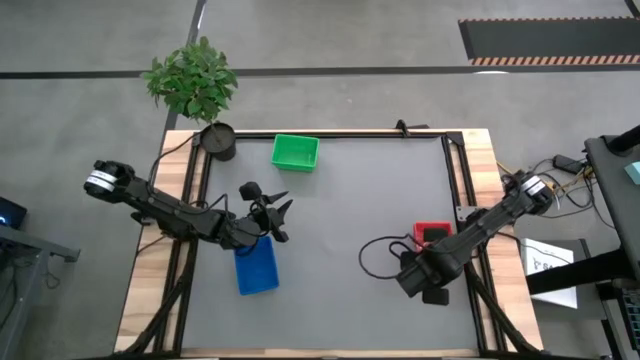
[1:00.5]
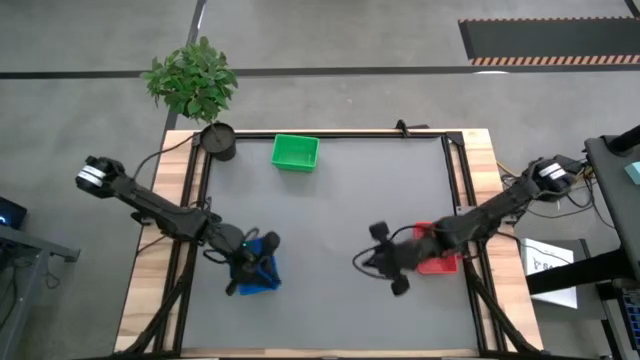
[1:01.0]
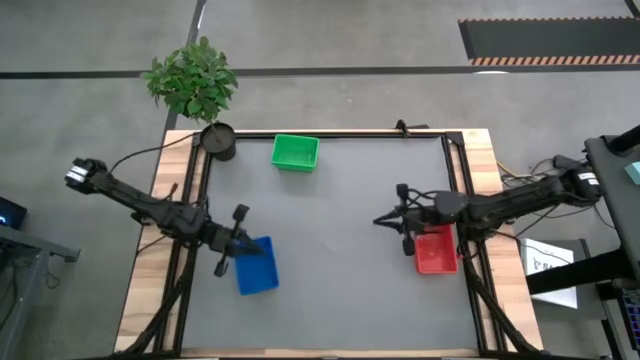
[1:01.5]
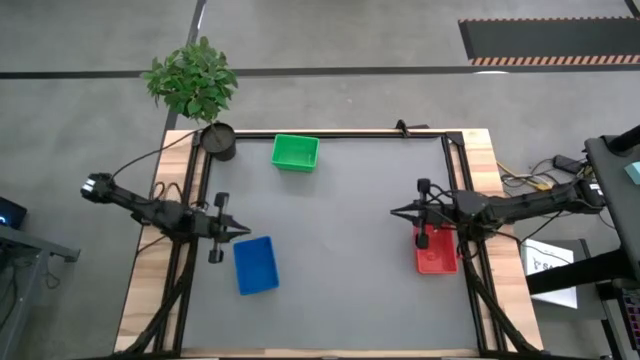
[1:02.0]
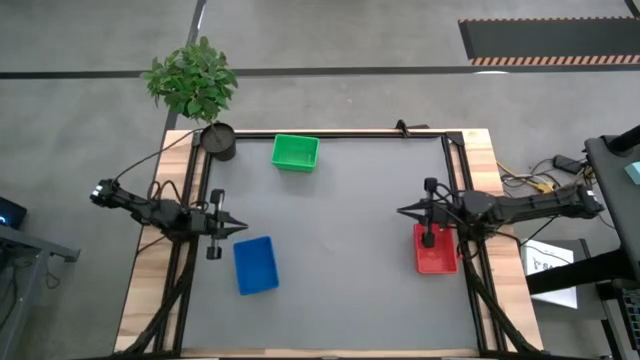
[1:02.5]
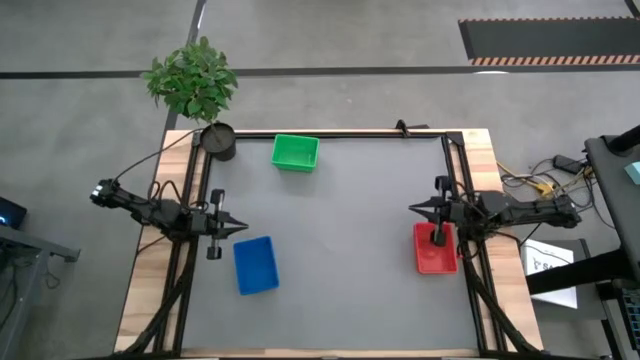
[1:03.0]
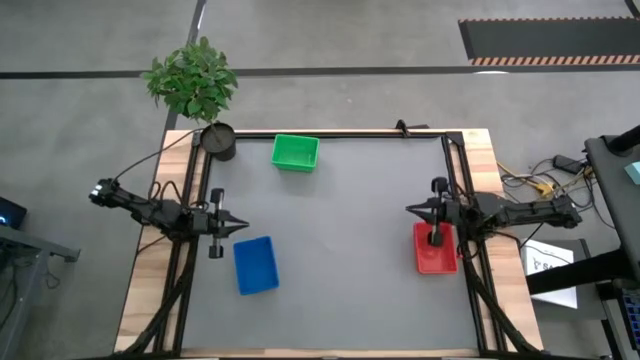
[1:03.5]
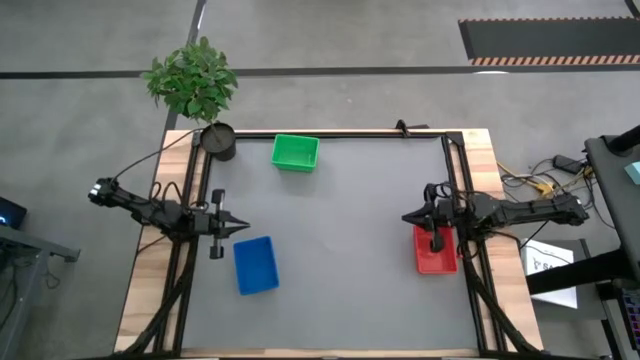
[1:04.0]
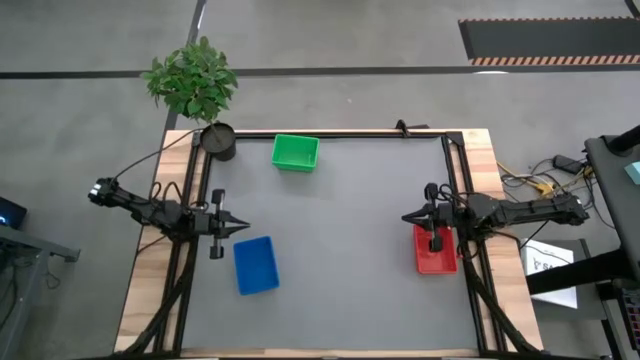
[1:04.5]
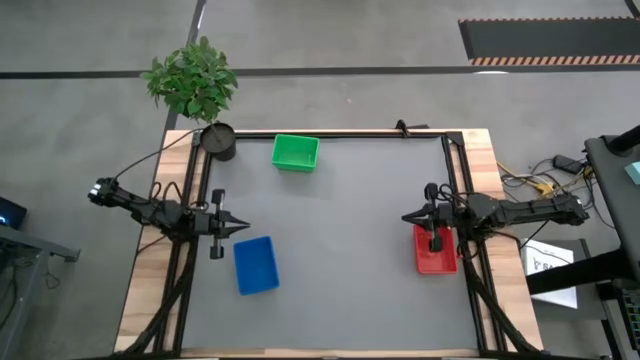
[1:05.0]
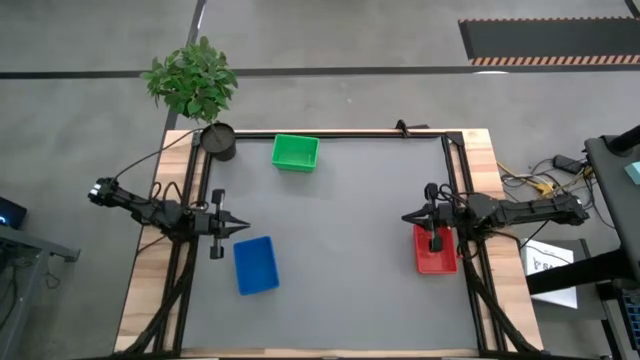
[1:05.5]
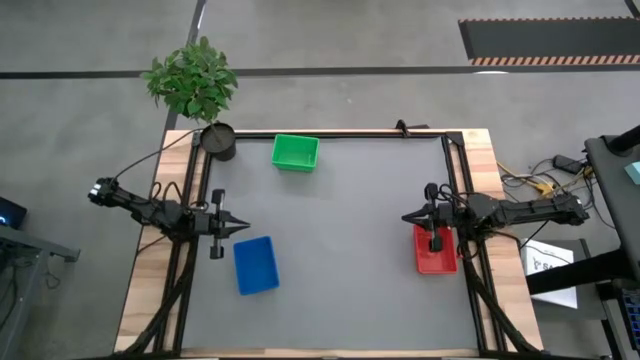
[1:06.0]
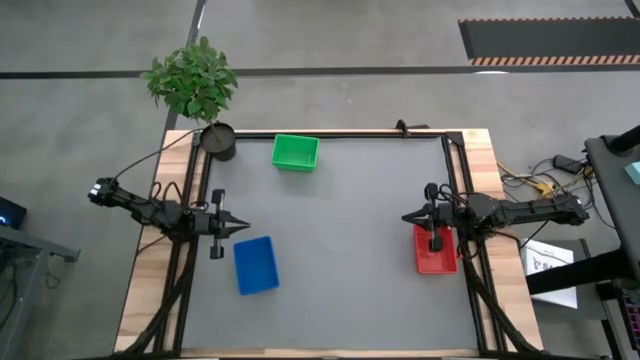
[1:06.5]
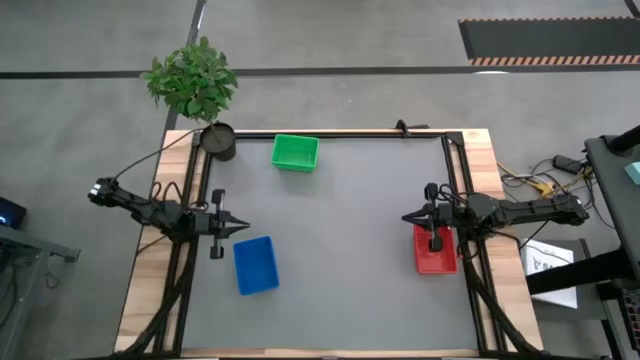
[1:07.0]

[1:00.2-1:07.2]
Return to Home Position

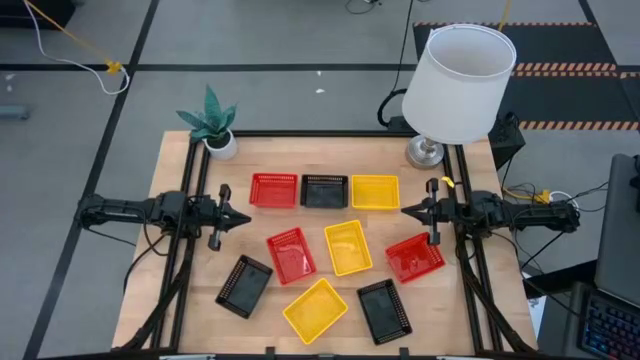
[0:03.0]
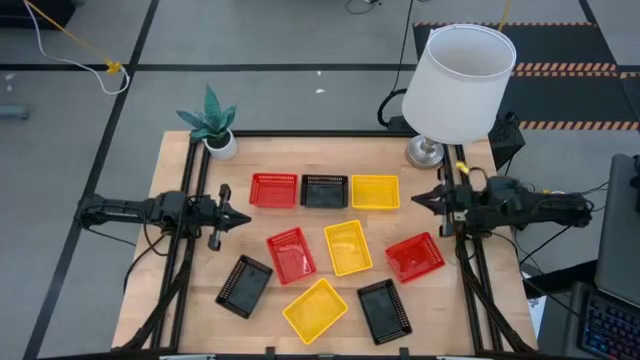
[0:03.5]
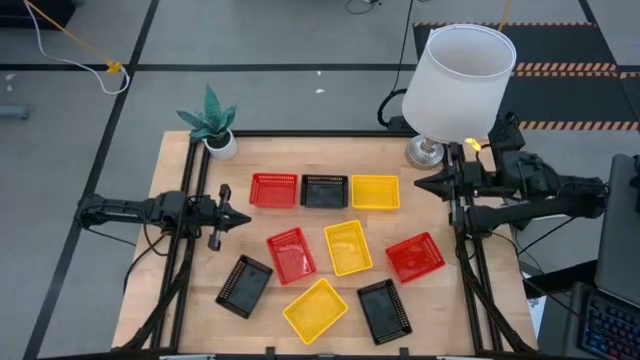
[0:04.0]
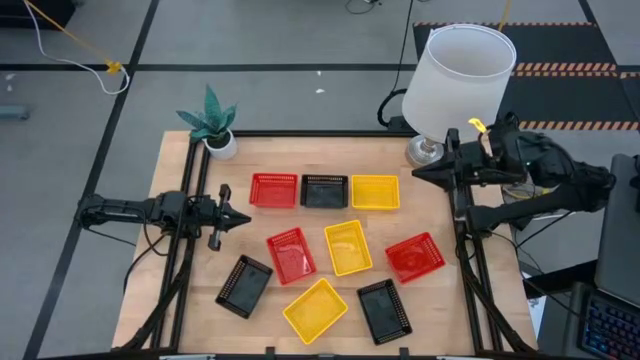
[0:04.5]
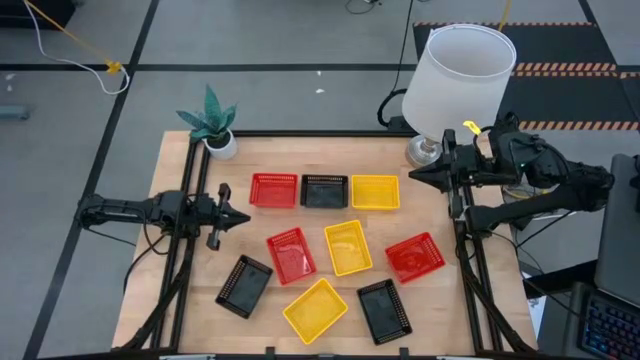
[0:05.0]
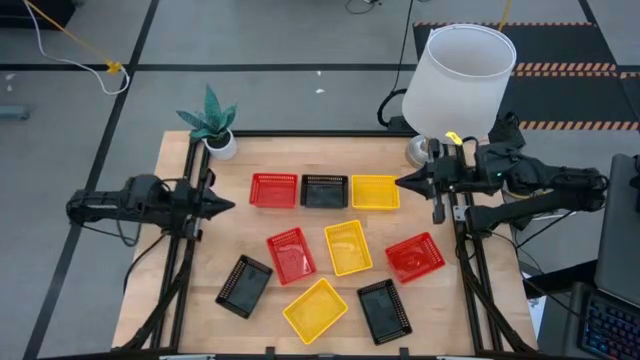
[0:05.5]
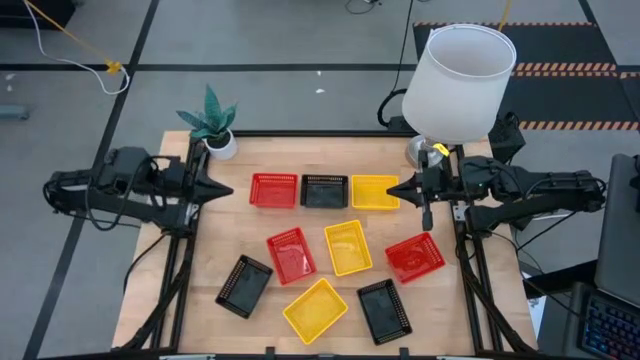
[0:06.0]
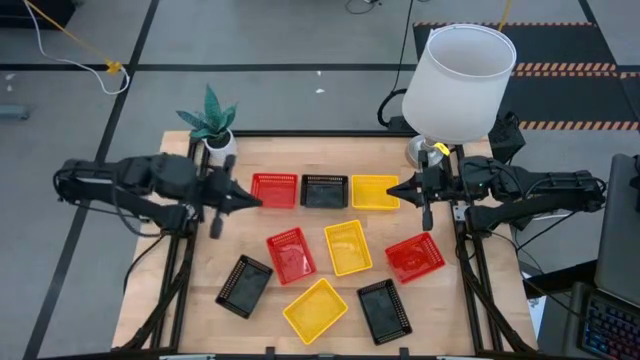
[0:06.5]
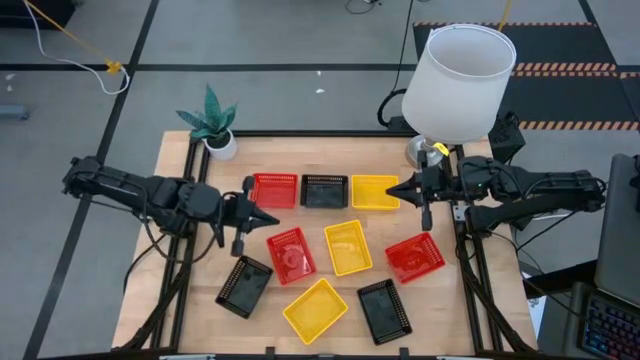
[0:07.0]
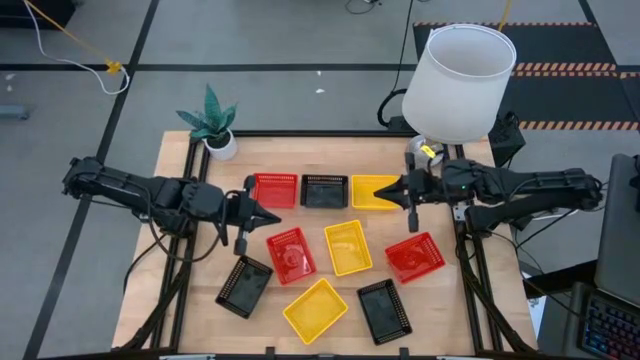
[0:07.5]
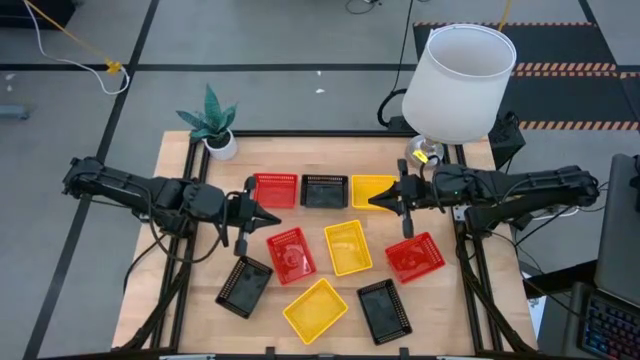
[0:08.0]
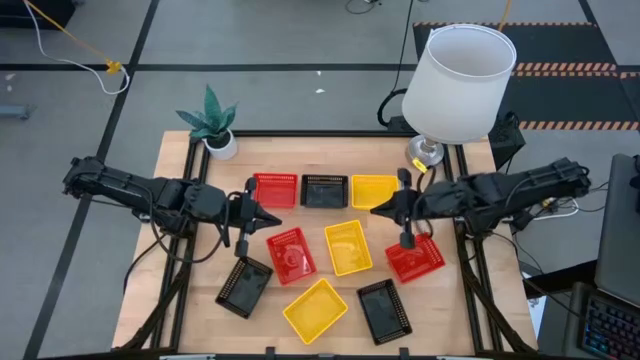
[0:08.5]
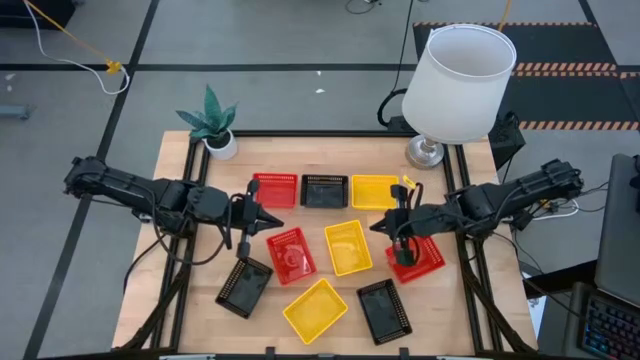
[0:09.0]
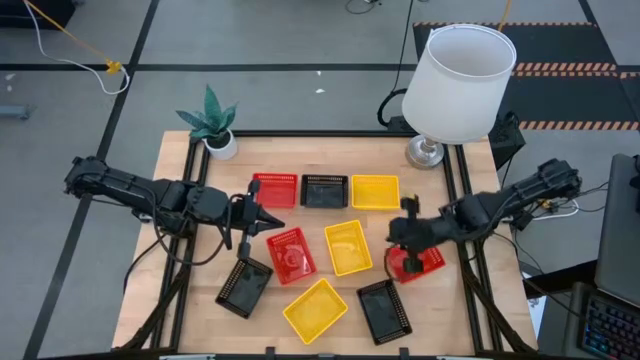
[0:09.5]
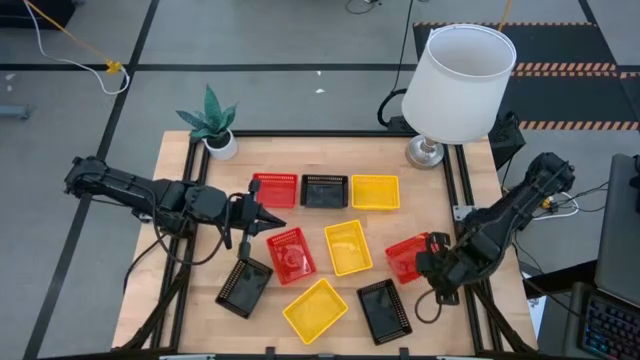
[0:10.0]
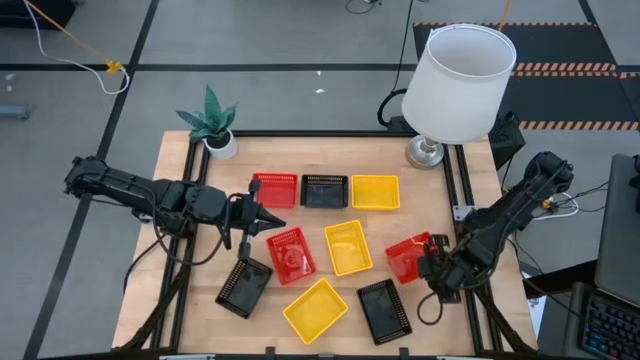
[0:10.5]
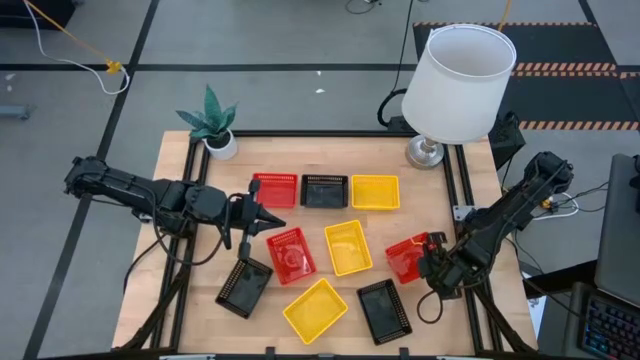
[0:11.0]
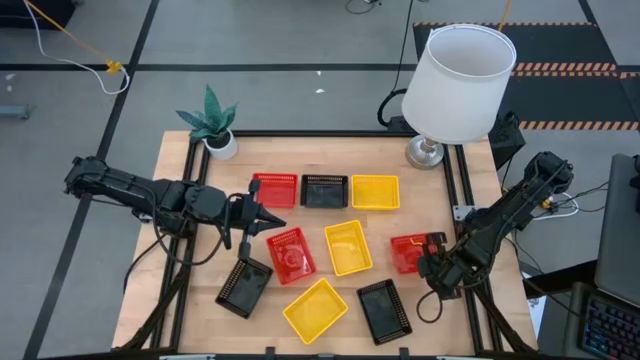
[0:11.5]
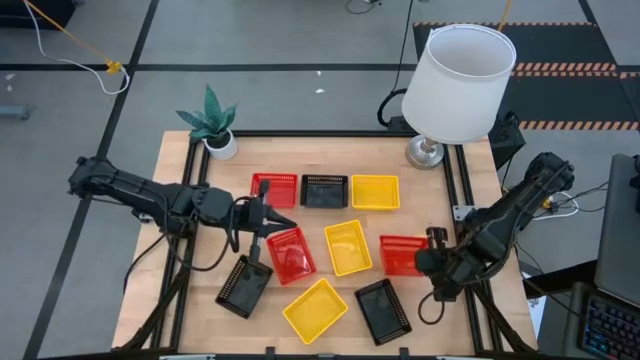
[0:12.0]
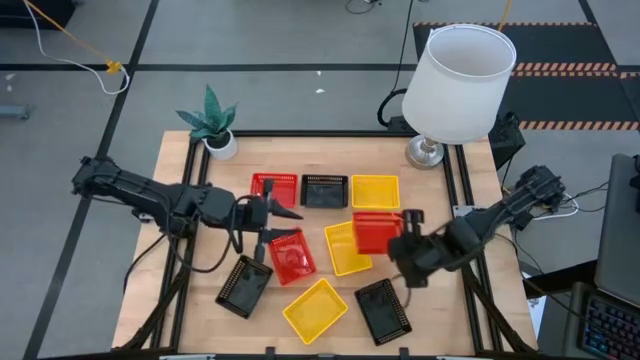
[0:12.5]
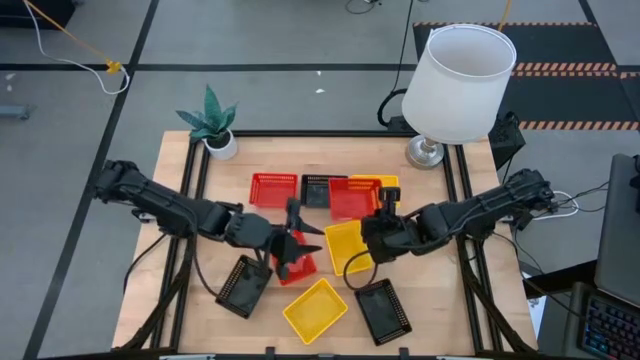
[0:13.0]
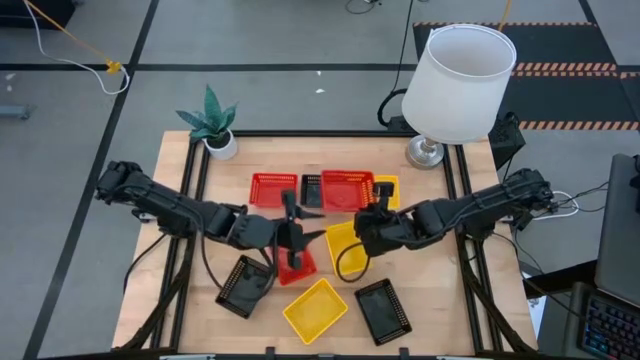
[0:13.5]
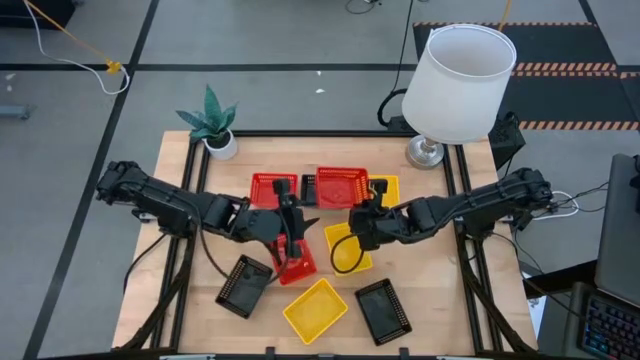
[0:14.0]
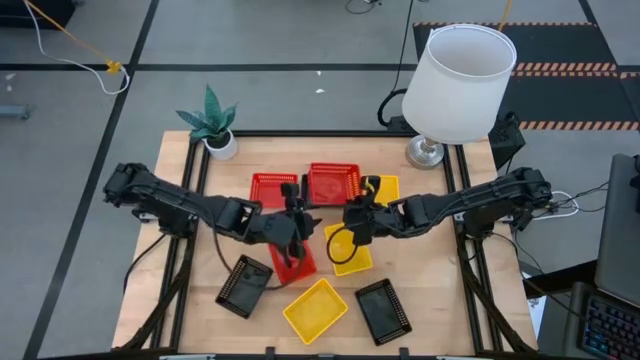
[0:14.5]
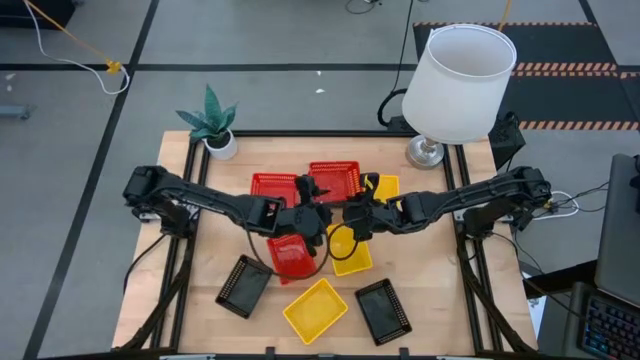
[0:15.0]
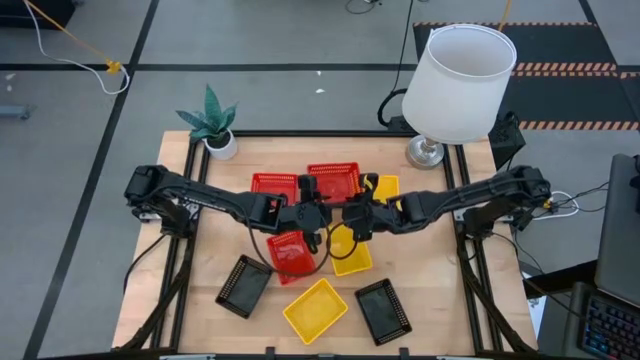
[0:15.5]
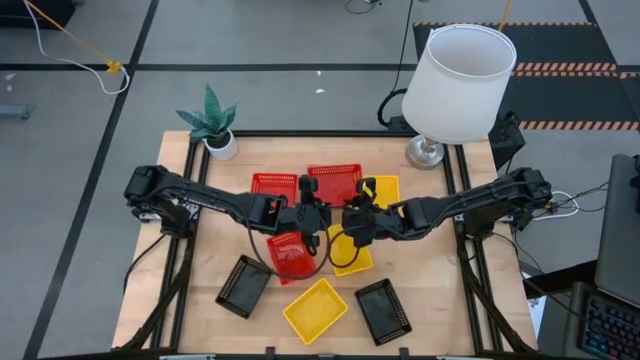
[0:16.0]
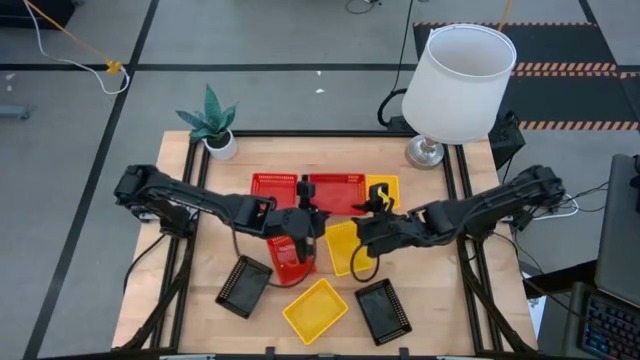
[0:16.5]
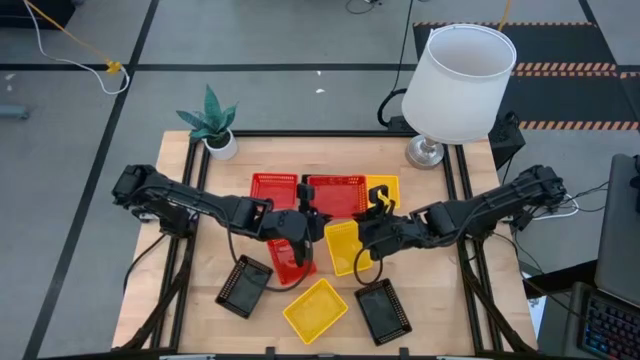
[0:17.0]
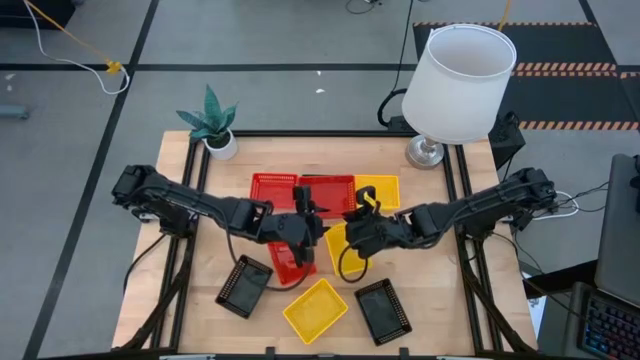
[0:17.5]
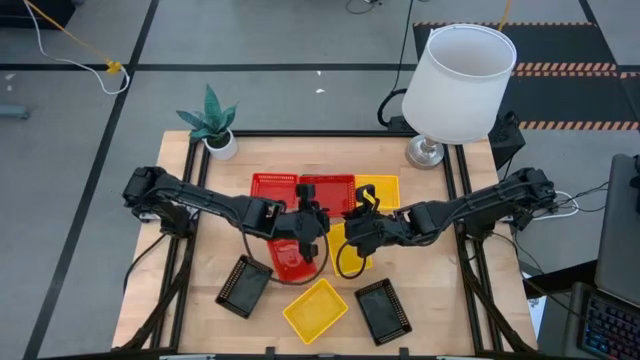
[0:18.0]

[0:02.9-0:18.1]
Stack the bottom right red bin on top of the top red bin
